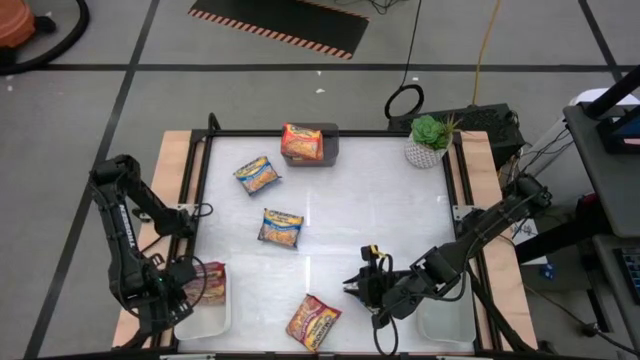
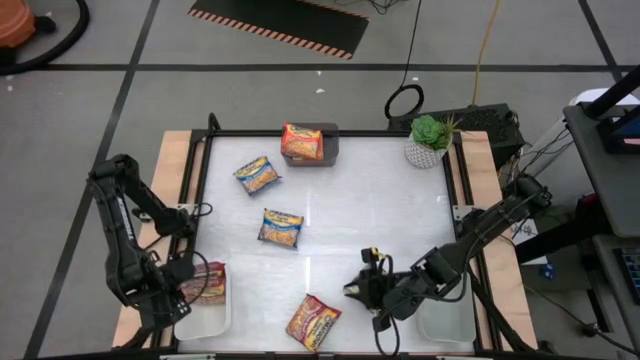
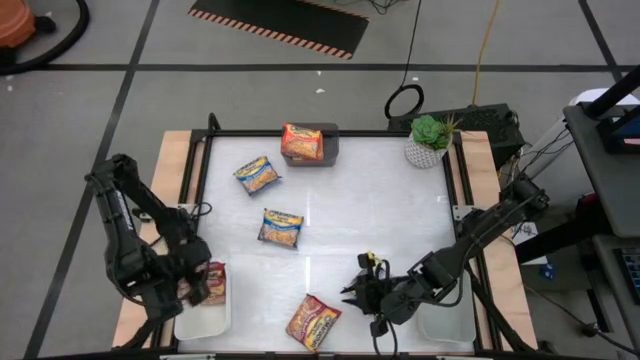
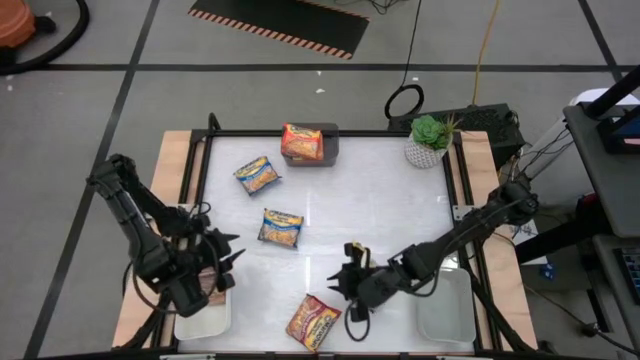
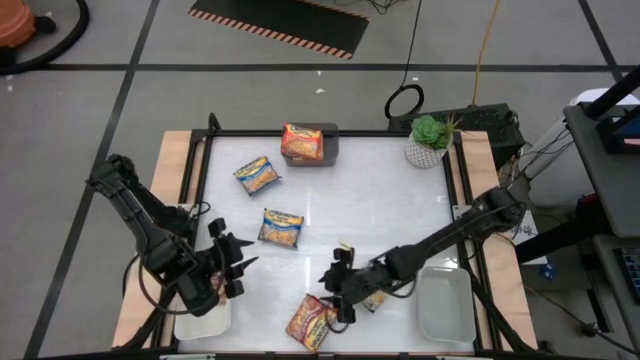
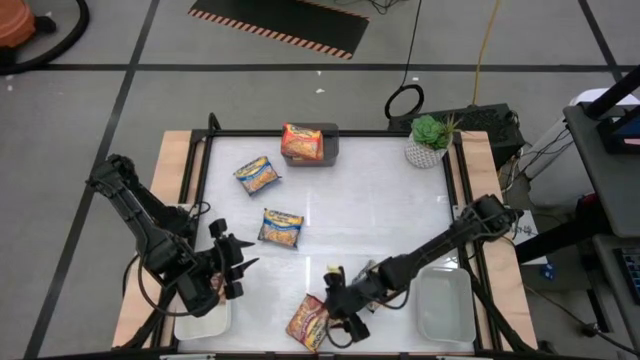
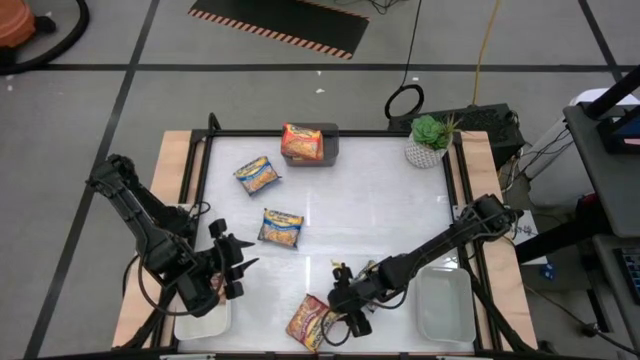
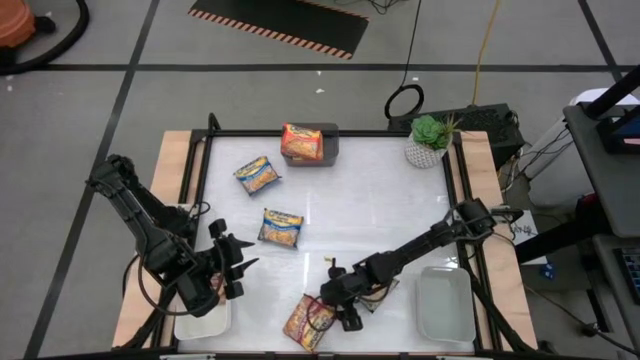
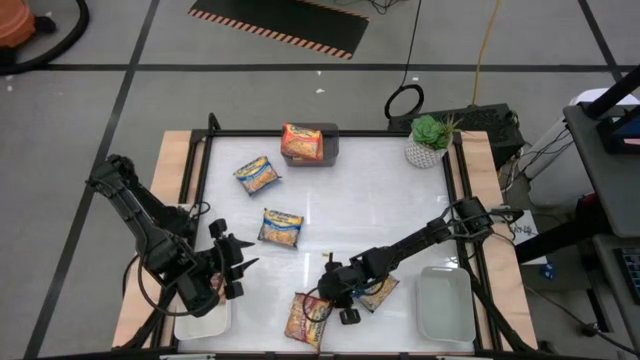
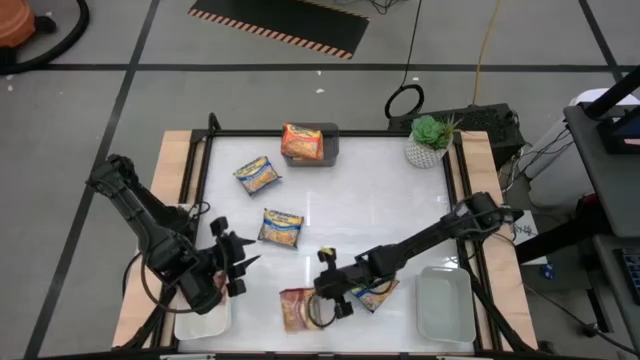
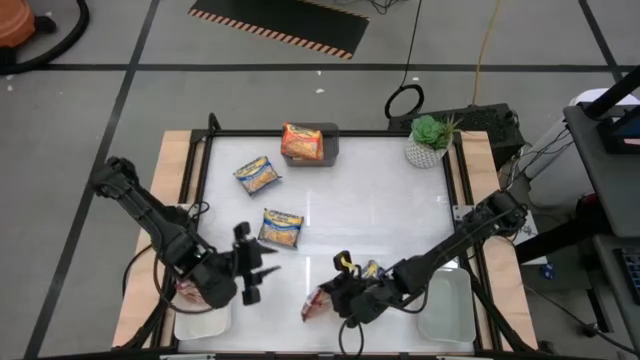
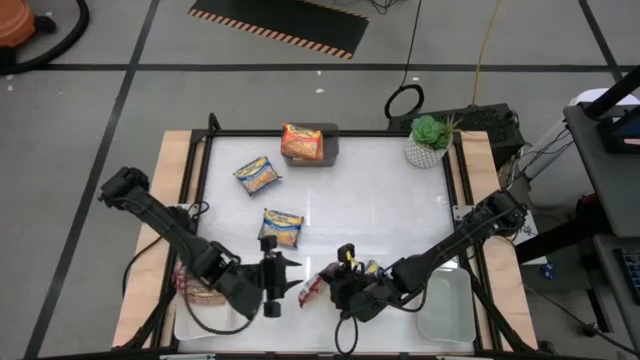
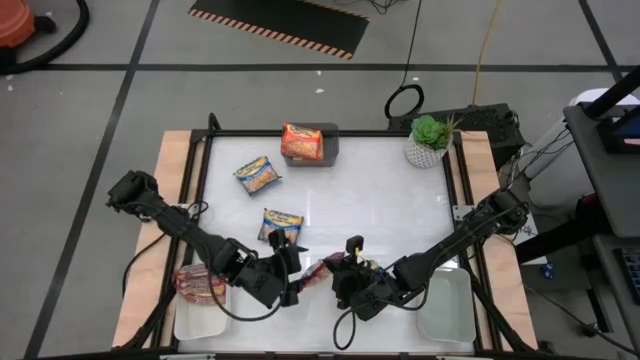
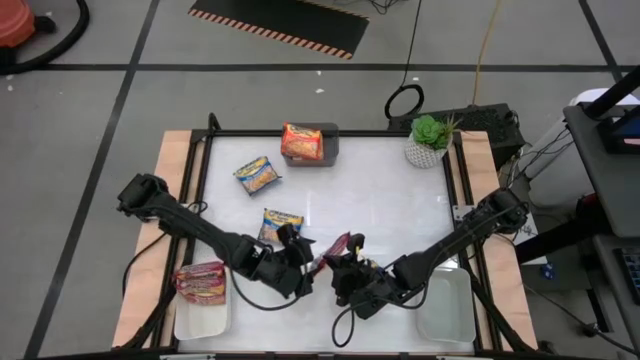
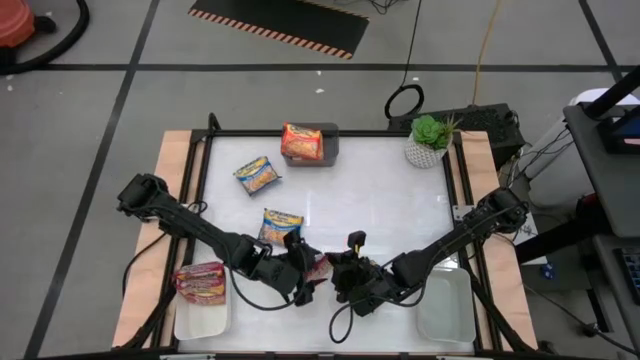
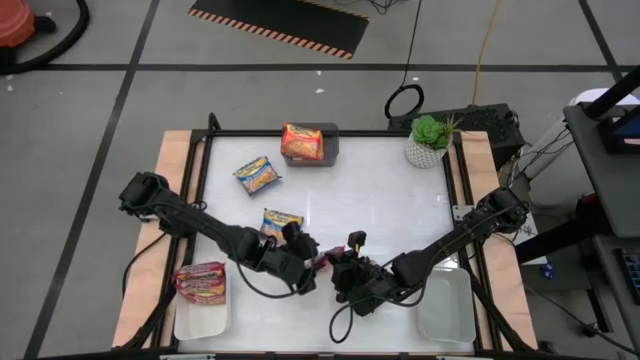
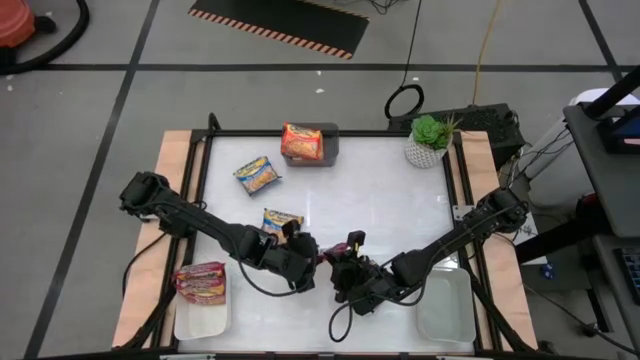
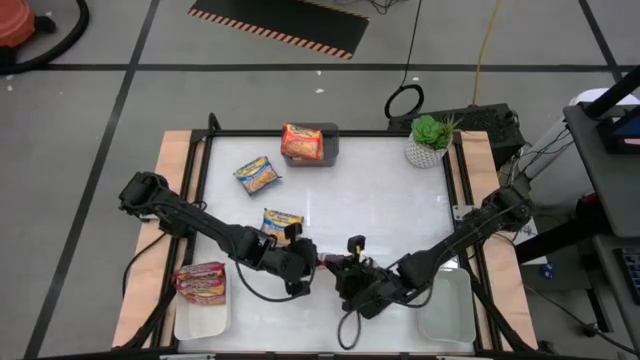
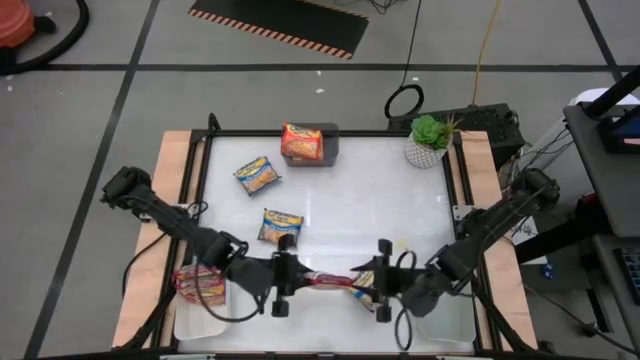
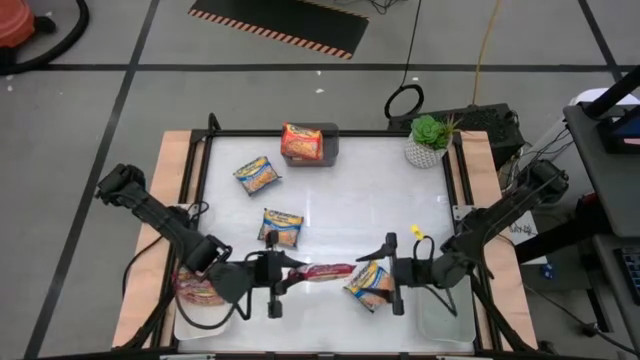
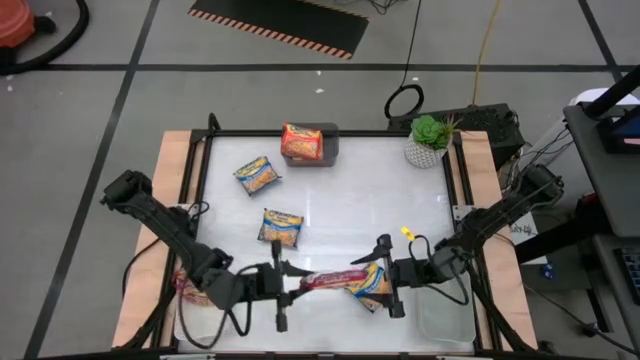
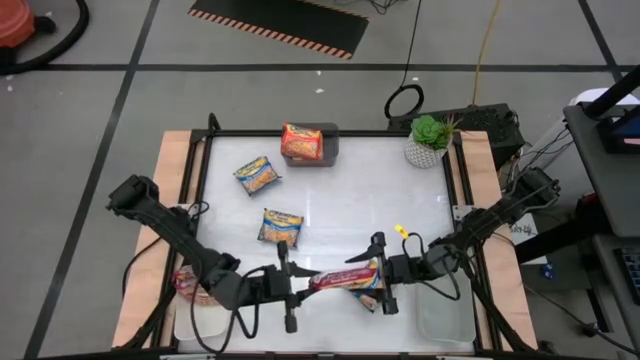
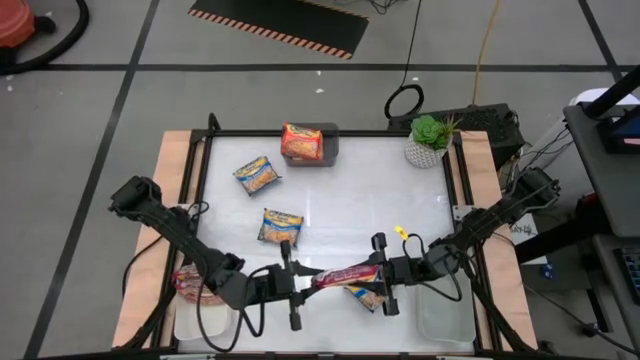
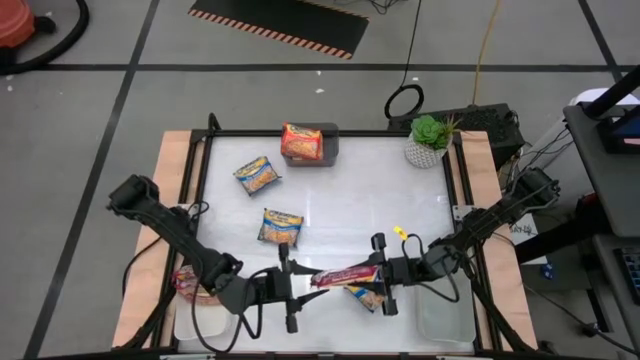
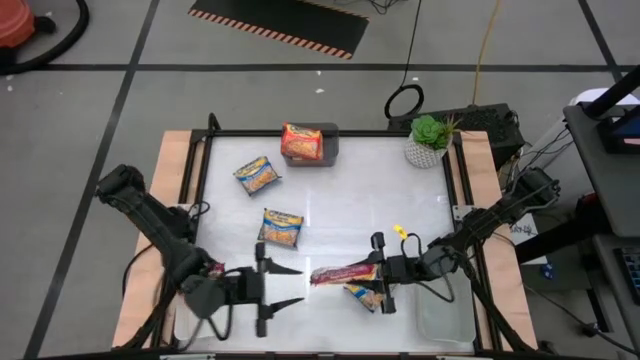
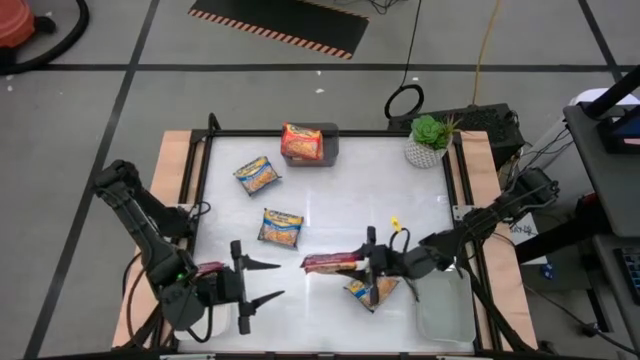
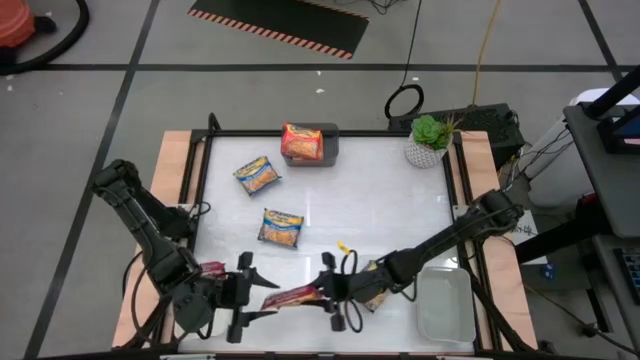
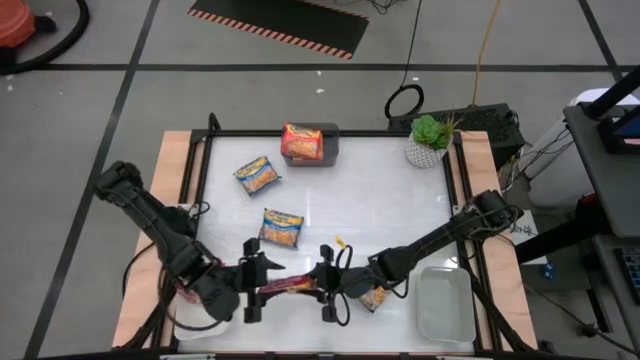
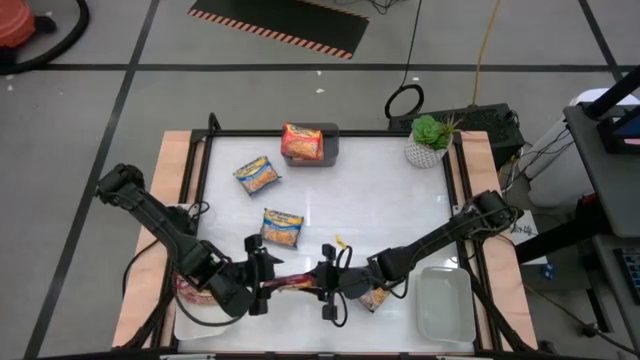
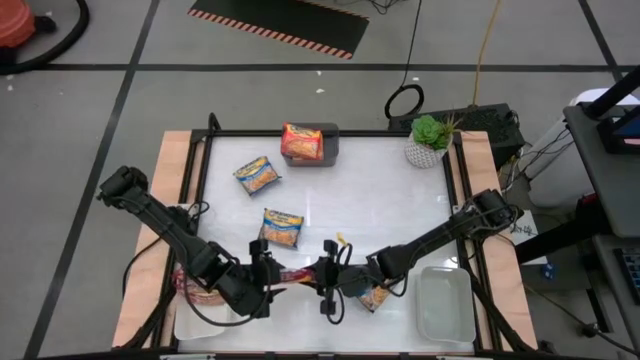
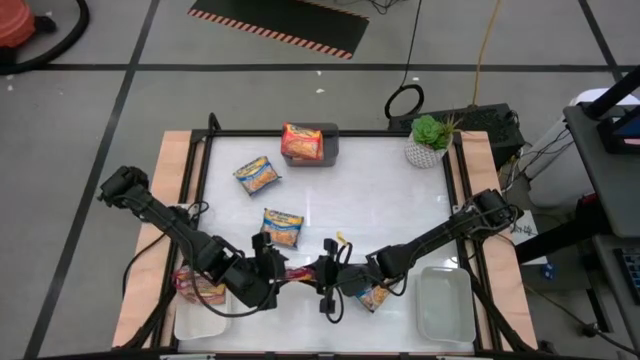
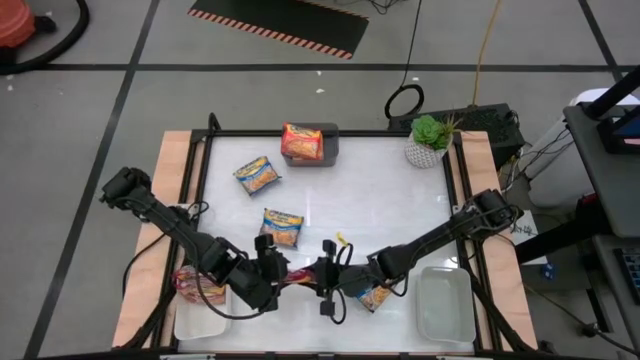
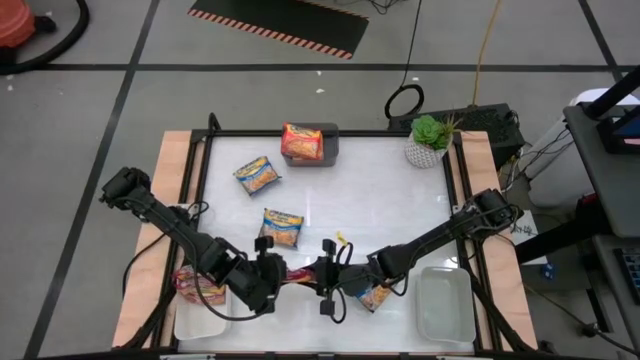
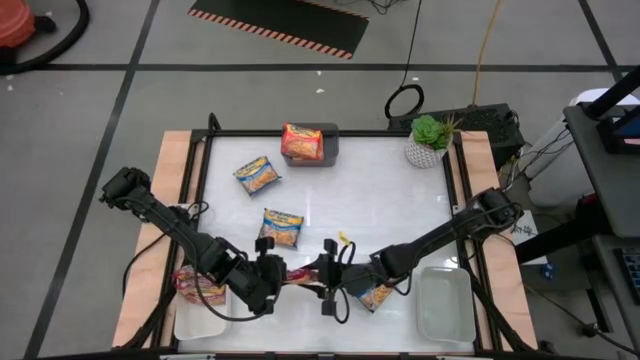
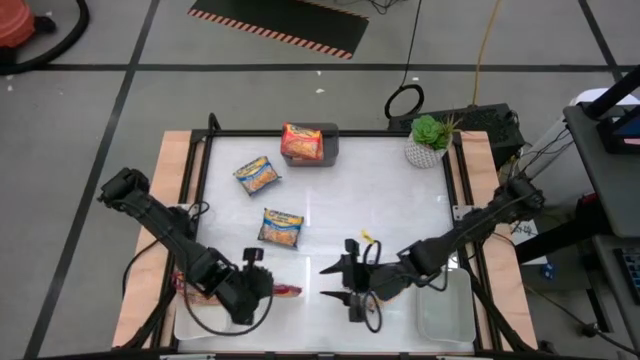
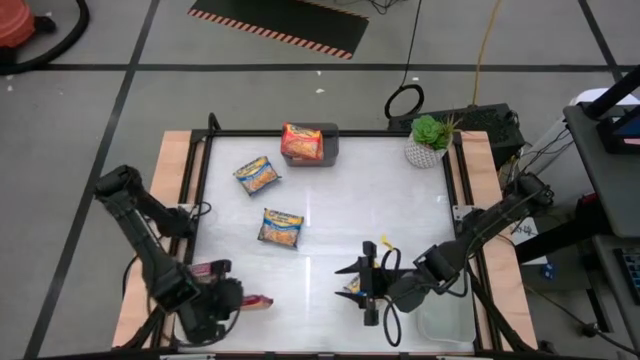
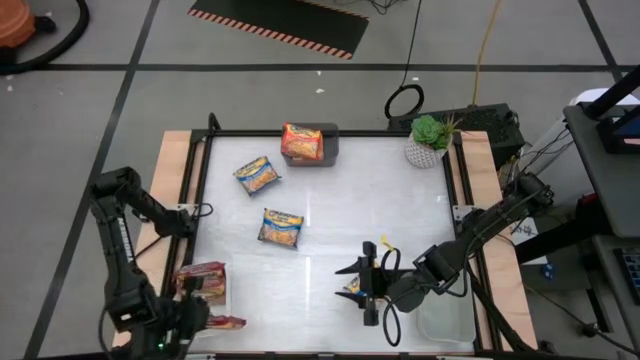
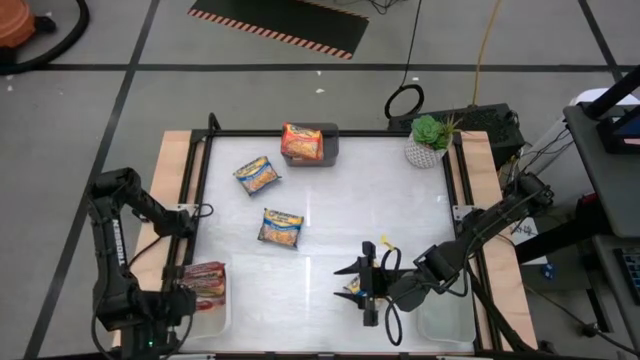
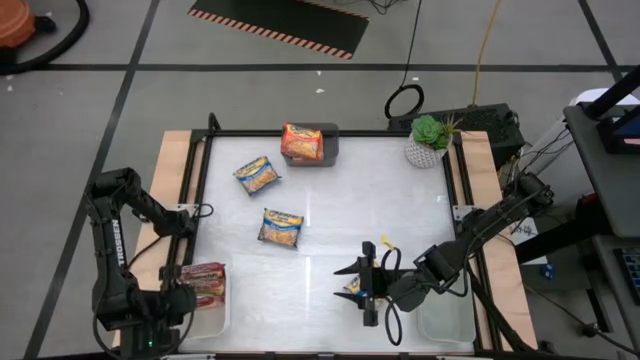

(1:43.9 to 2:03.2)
Task: Sort Maruchan noodles
Put the red noodle pack into the white bin
